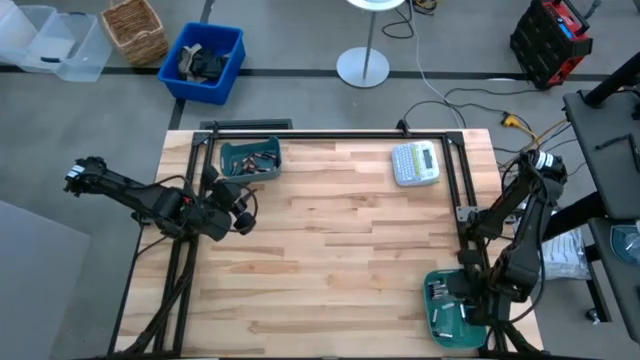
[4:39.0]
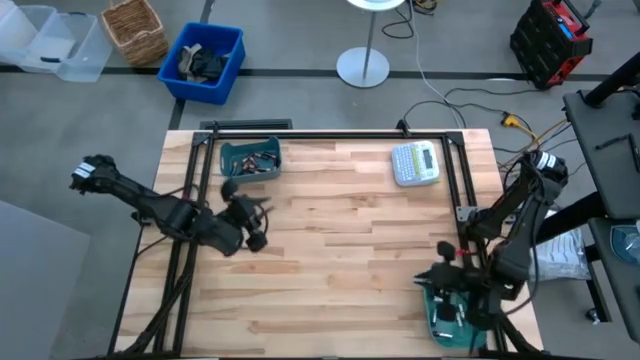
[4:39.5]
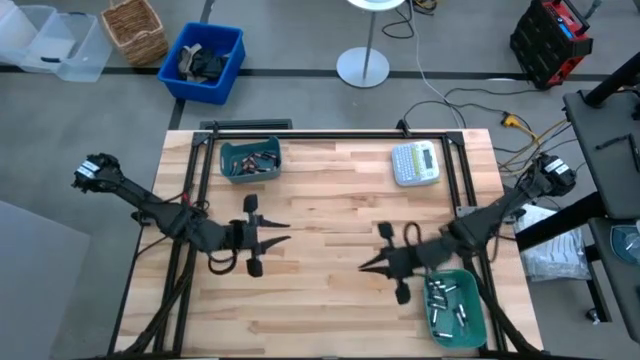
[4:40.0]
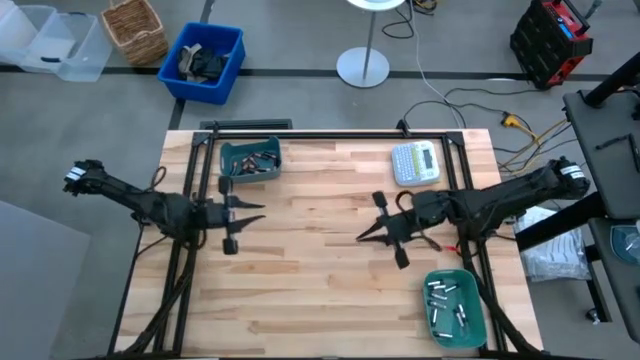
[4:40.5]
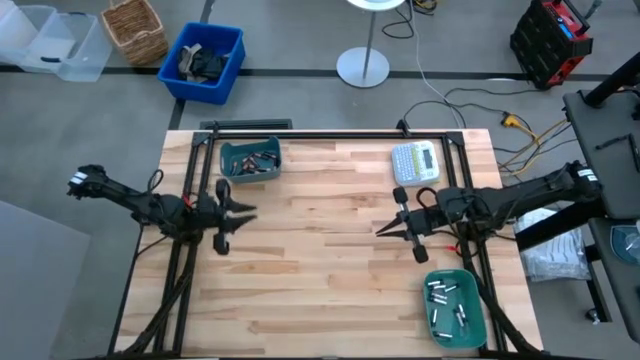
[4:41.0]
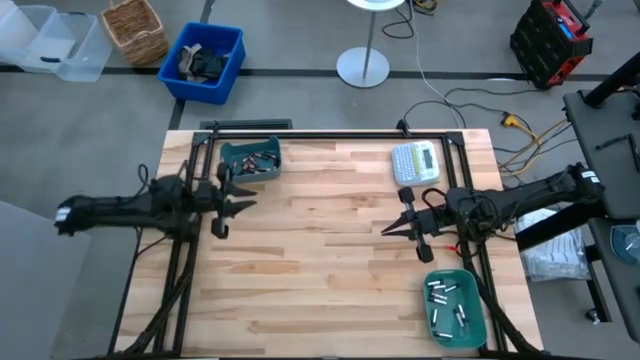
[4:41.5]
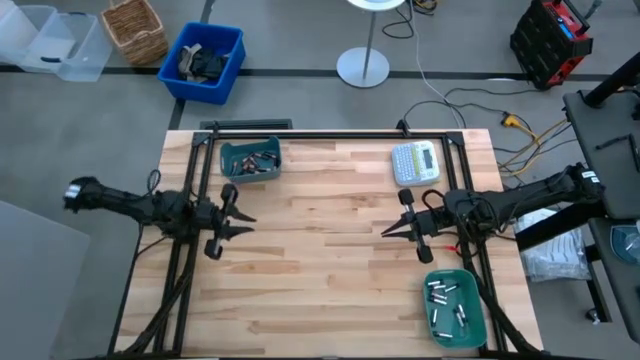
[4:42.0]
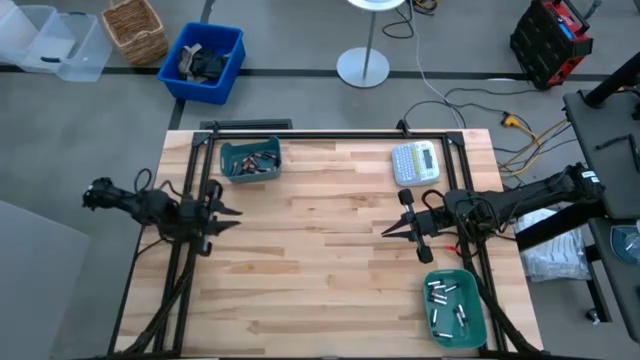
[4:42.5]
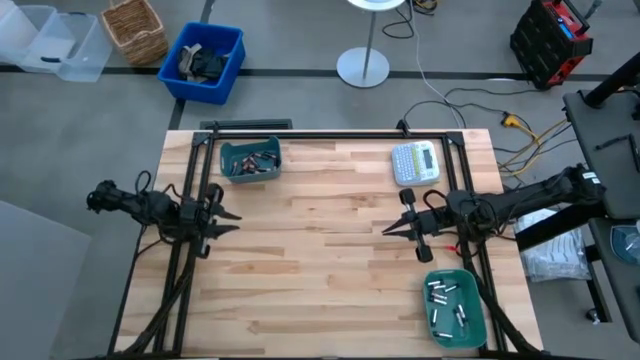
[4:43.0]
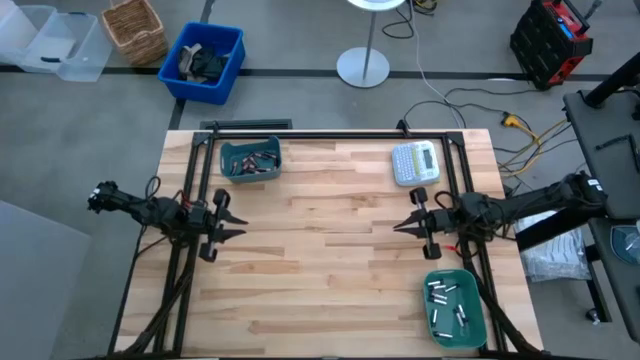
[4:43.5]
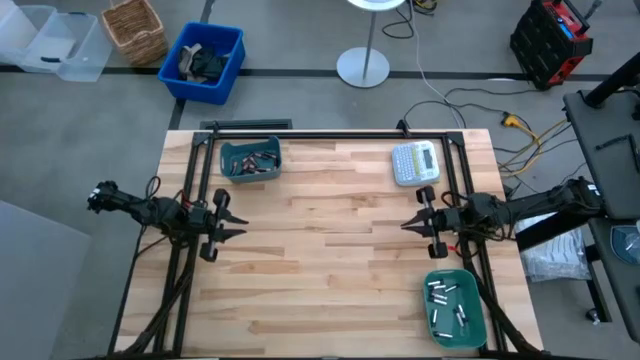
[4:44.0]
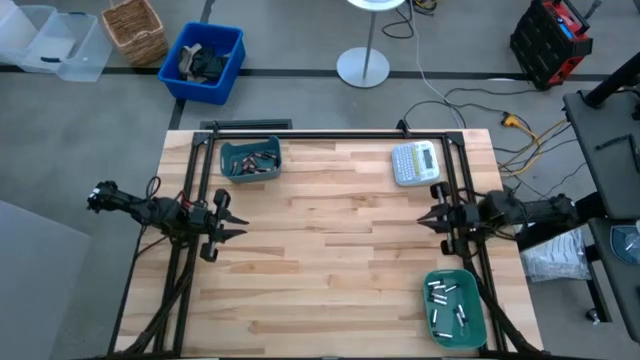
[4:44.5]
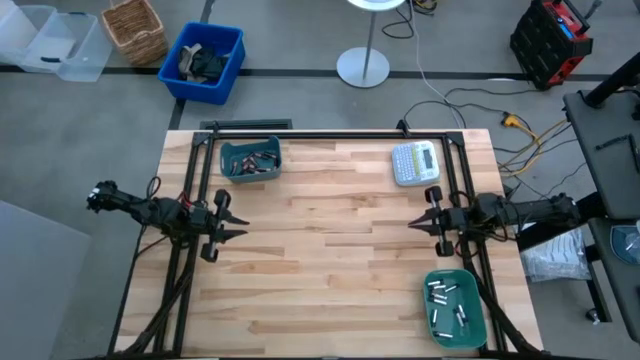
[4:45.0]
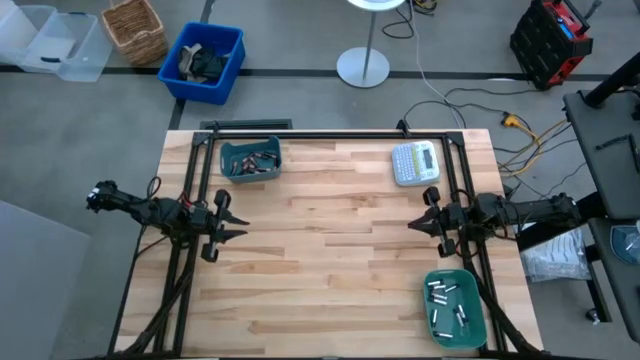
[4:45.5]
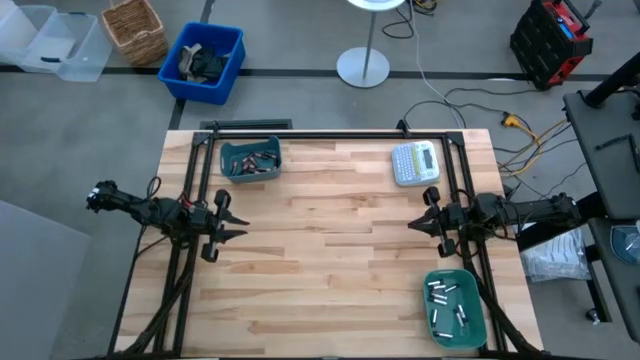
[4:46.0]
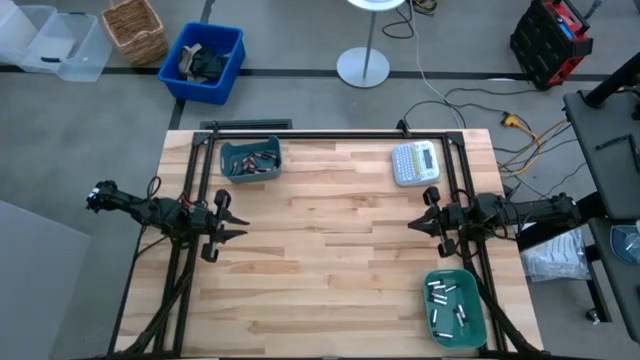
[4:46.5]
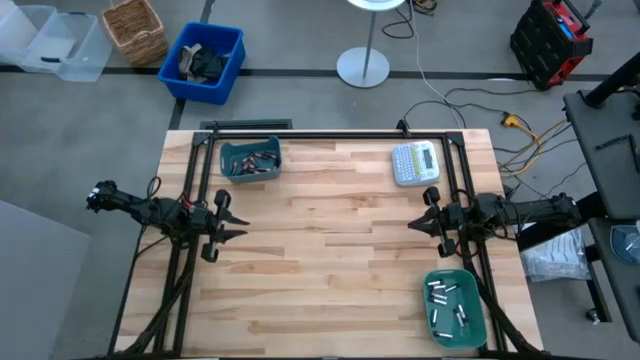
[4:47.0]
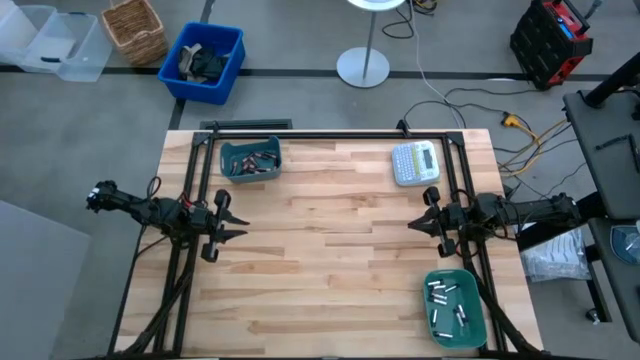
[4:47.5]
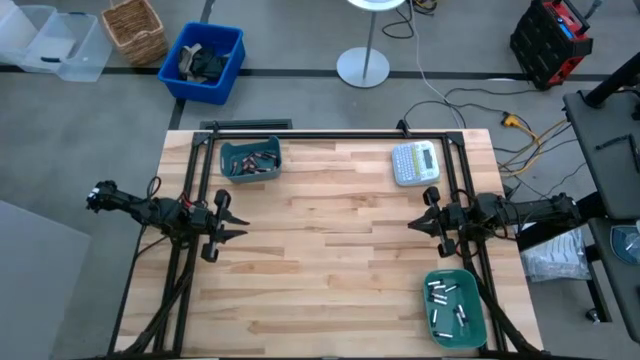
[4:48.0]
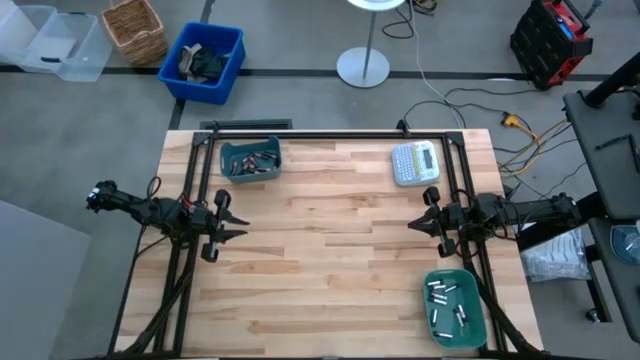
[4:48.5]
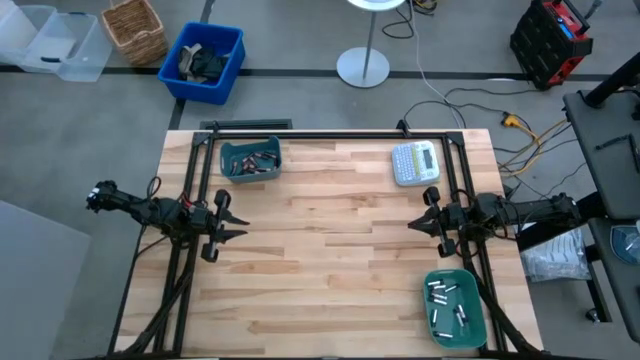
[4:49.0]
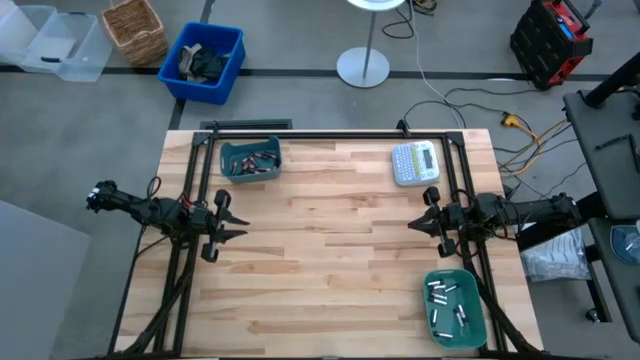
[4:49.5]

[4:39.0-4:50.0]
Task: Sort batteries
Return to Home Position

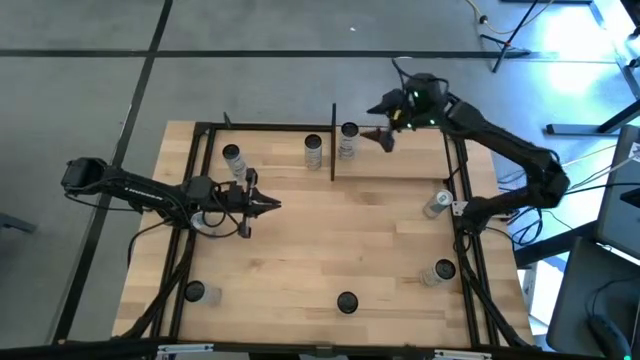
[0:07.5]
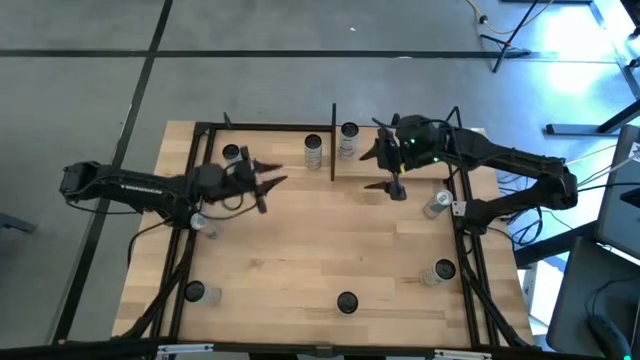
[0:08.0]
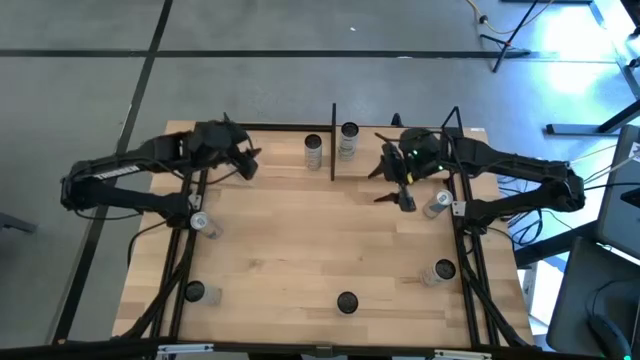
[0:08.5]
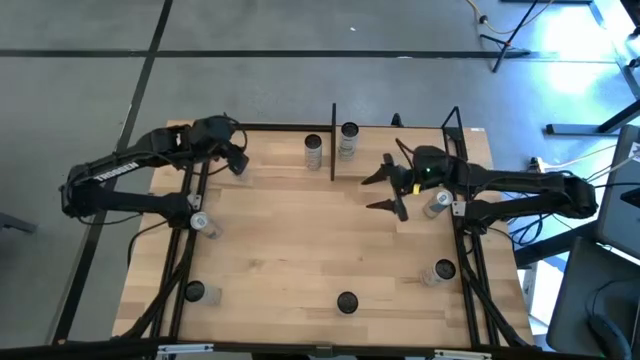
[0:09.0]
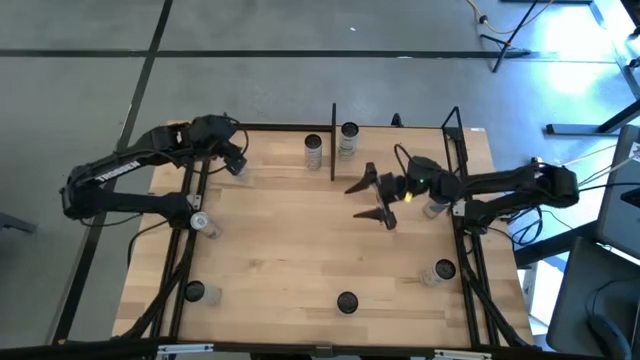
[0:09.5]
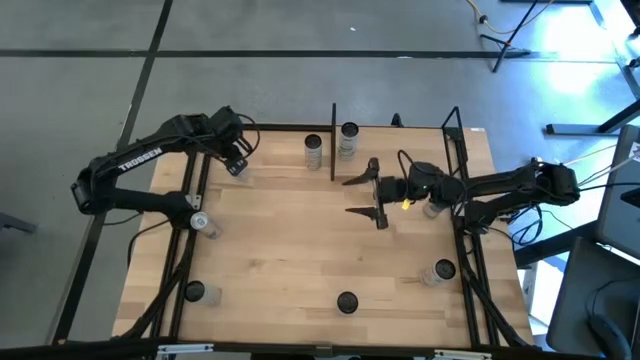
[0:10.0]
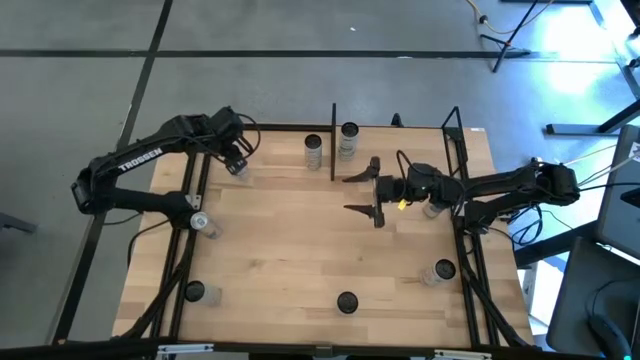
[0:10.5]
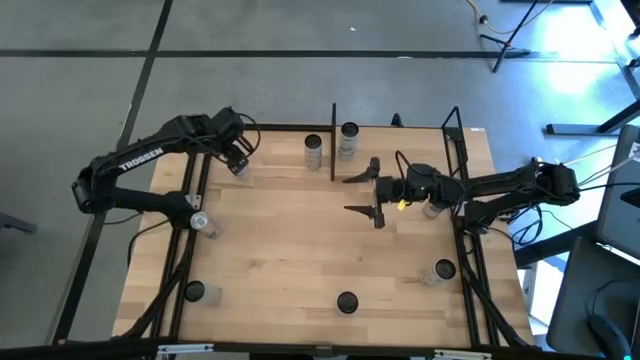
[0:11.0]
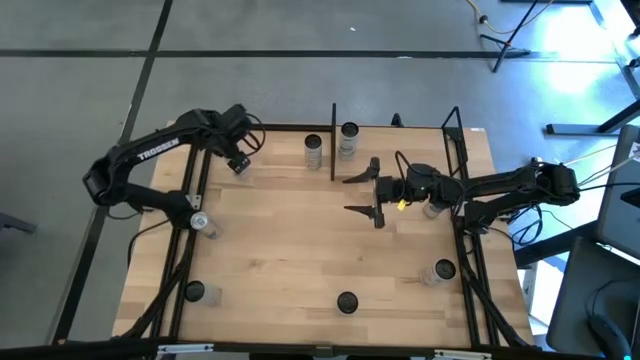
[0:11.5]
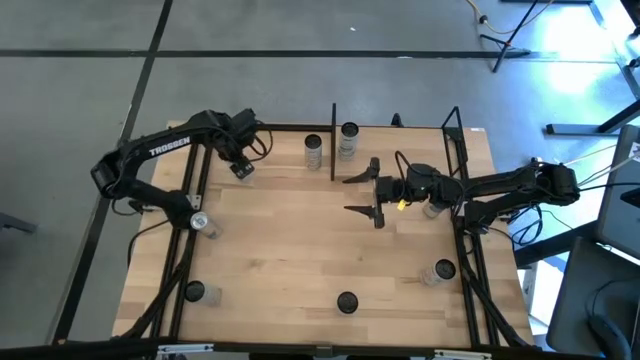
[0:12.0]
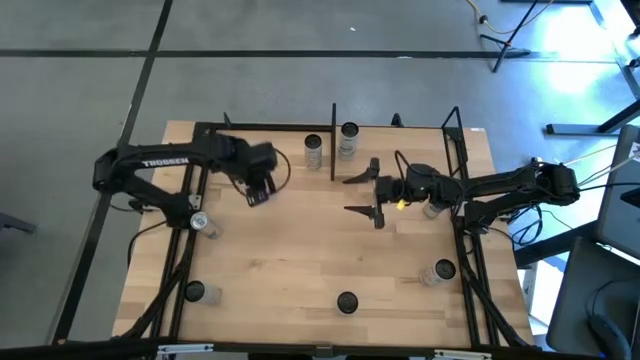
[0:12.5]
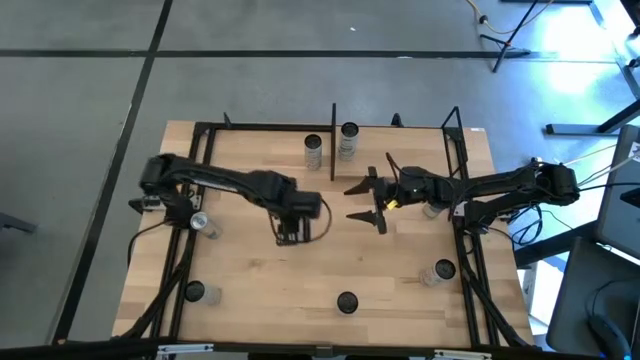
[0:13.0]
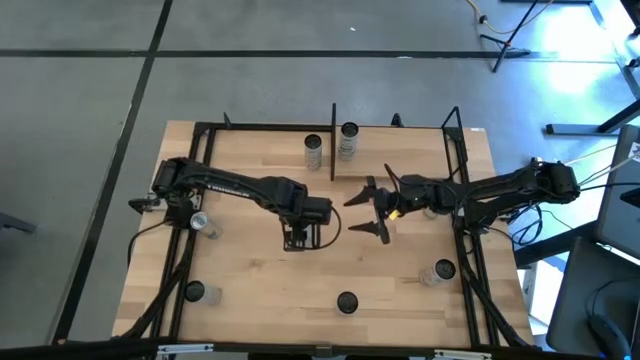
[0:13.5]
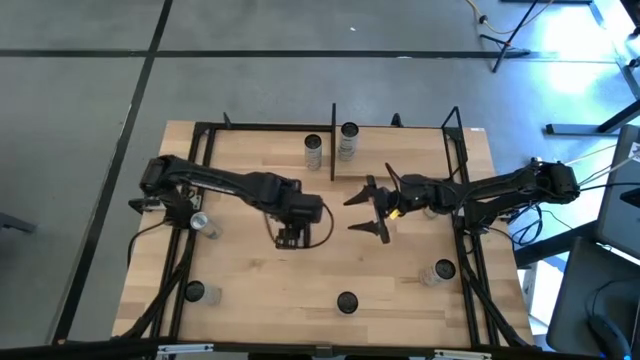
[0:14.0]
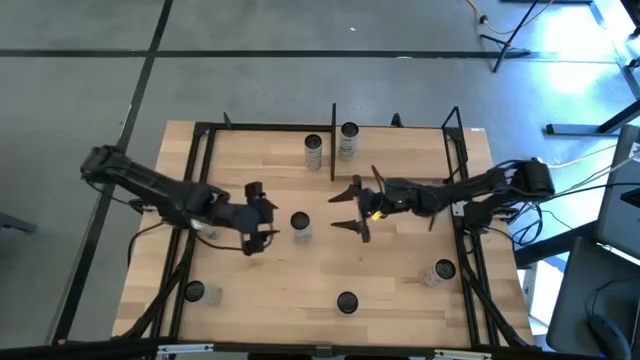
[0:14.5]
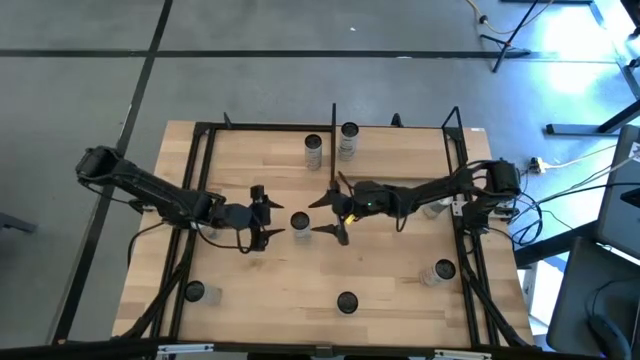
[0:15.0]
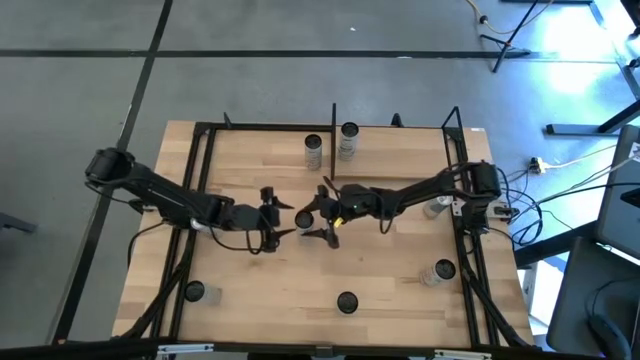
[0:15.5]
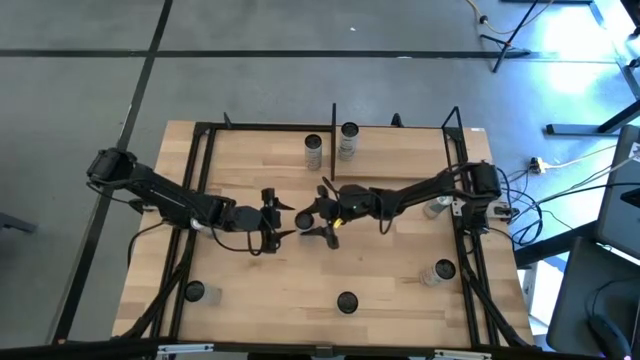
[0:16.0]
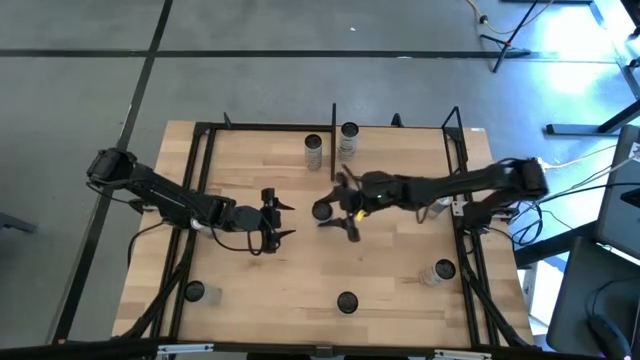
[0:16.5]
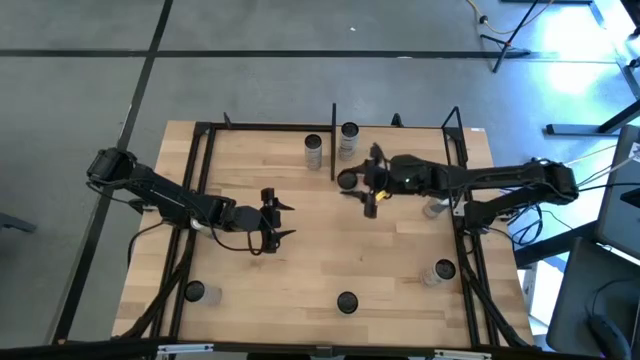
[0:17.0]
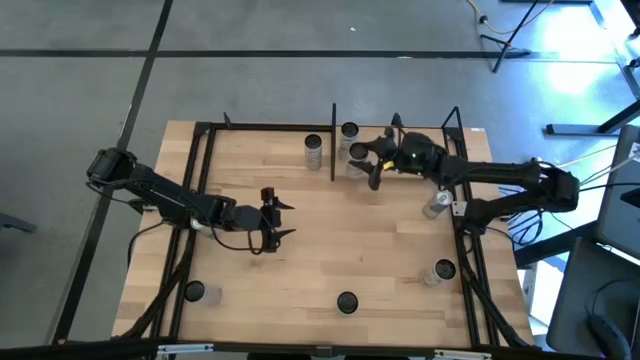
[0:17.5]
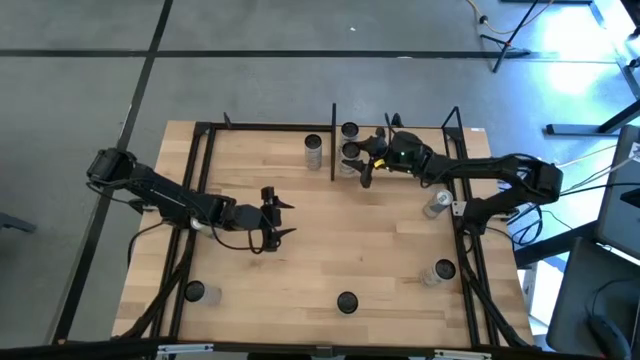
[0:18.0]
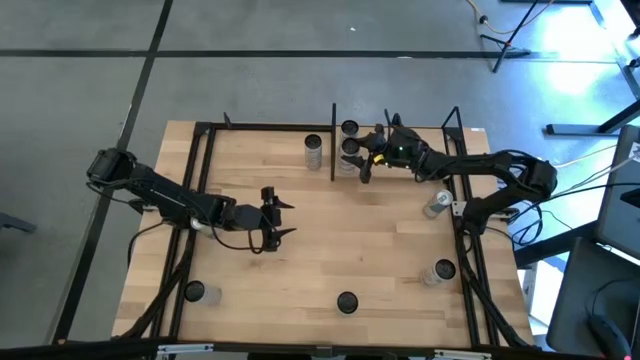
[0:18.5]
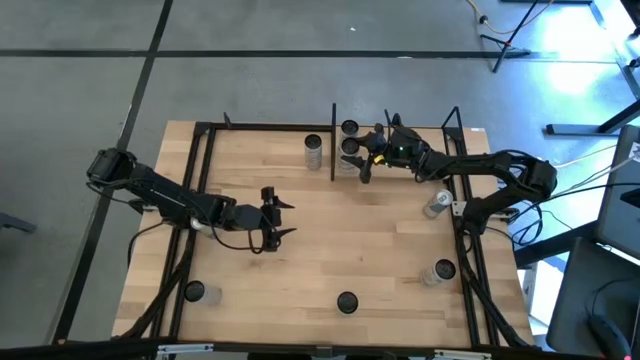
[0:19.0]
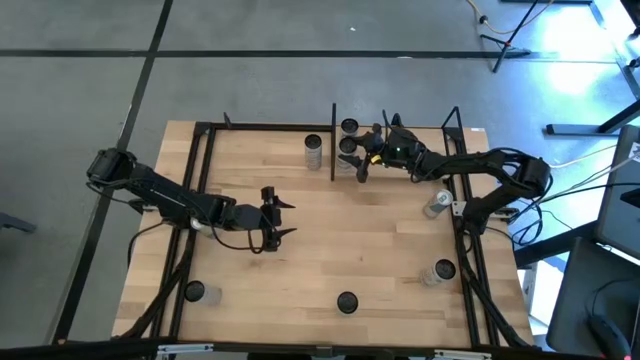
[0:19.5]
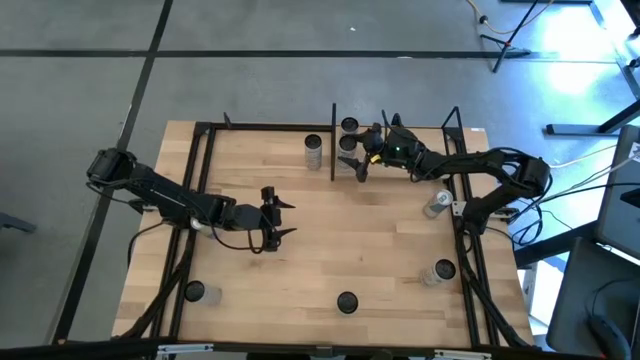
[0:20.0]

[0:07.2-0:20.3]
Task: Place canned beverage on shelf
Put the blue-white soda can aligned with the other blue-white soda can on the shelf
